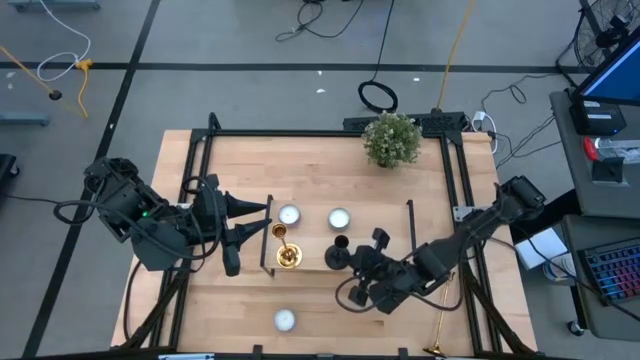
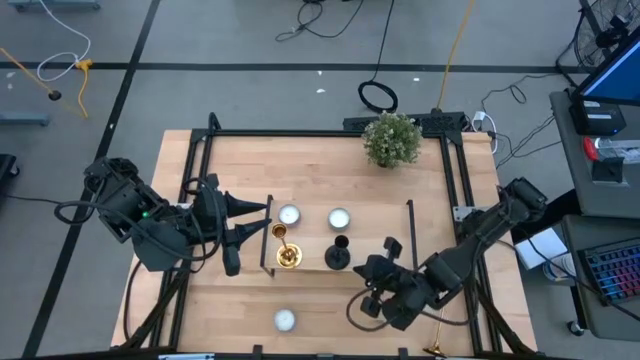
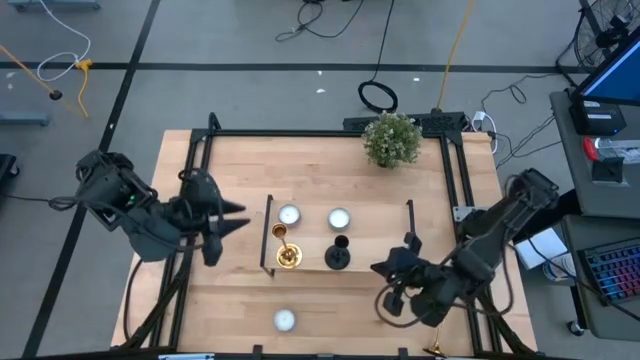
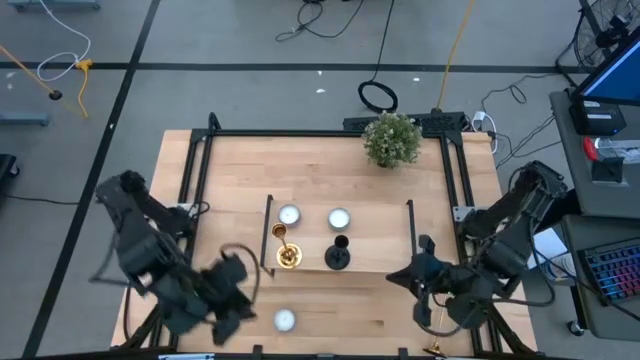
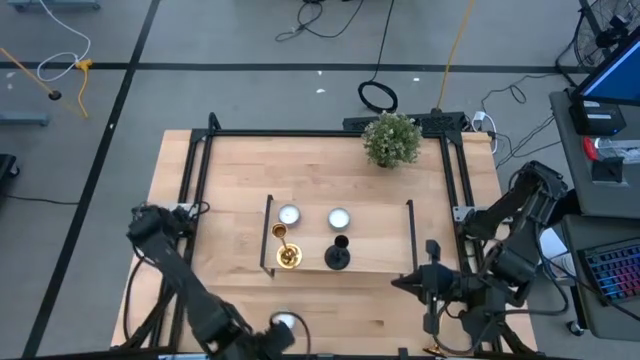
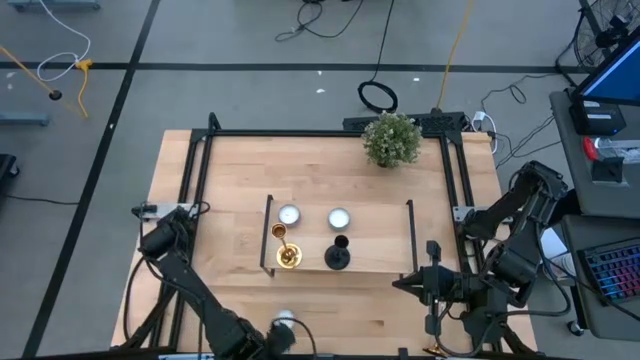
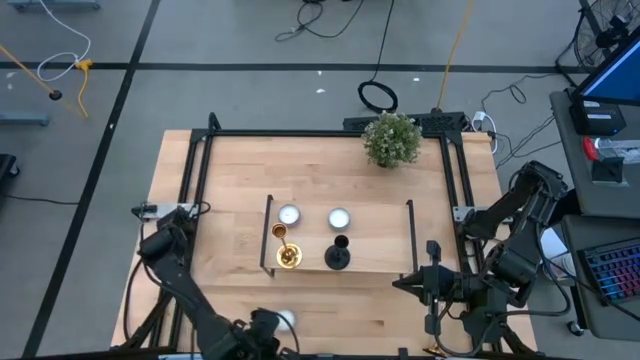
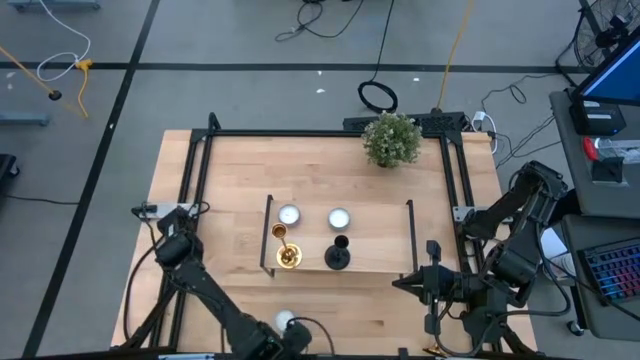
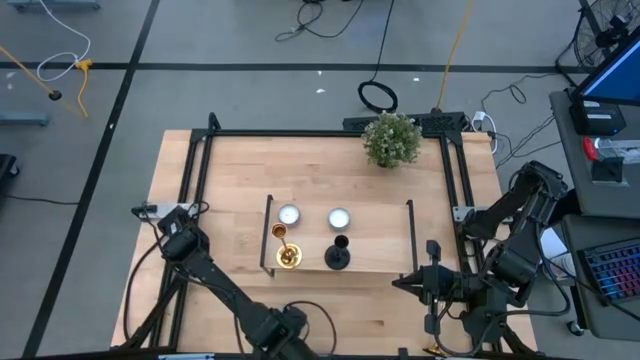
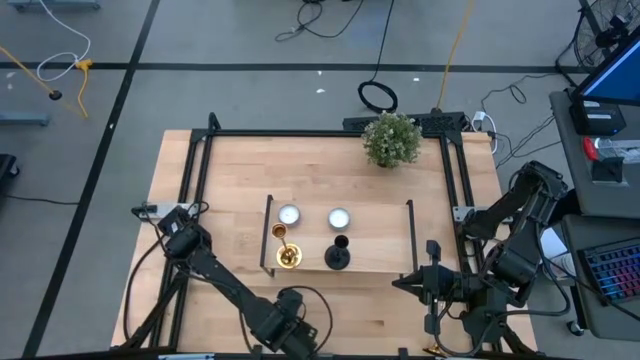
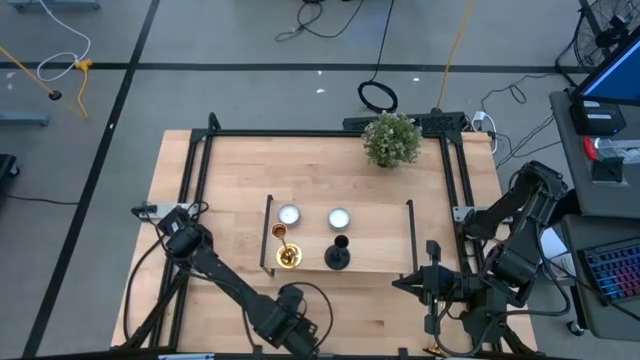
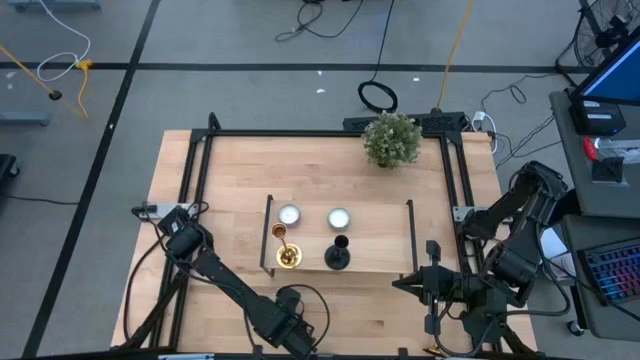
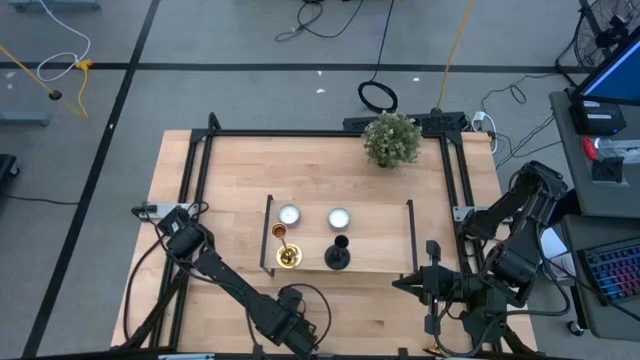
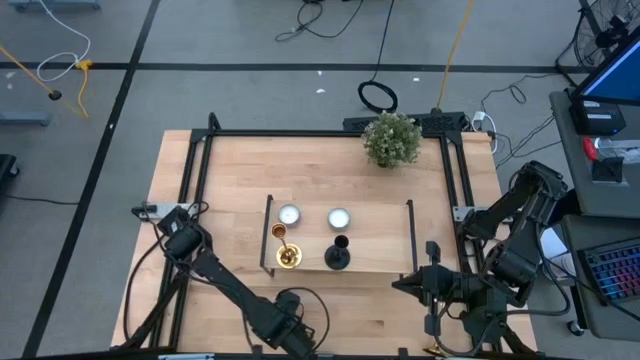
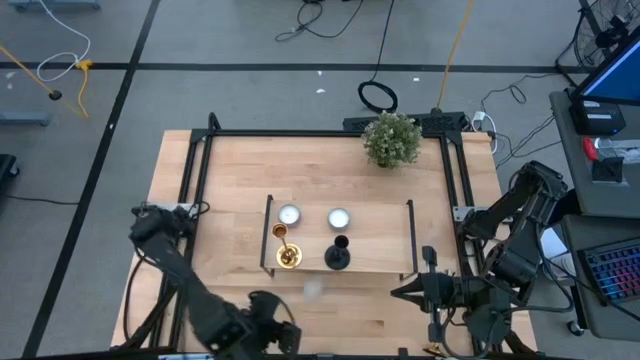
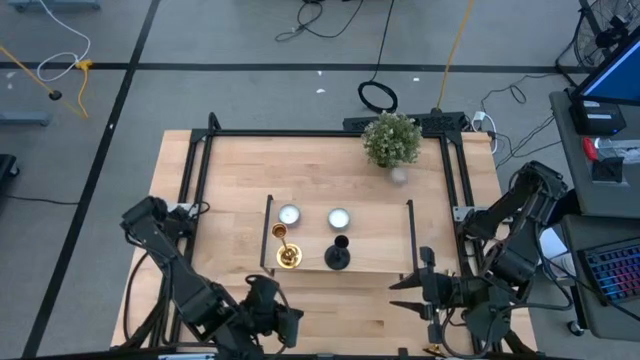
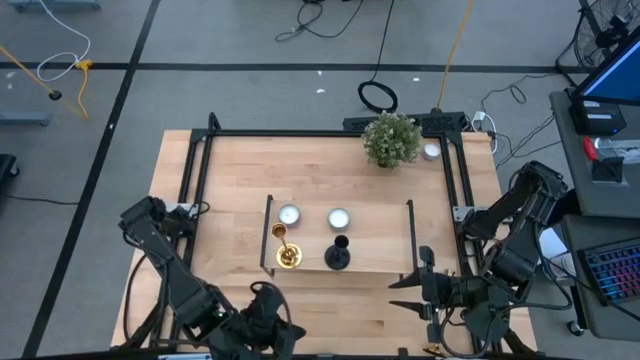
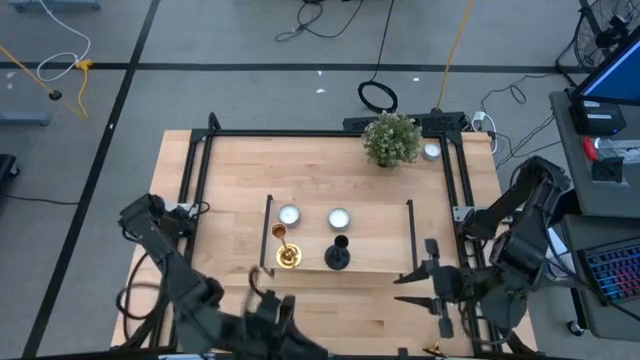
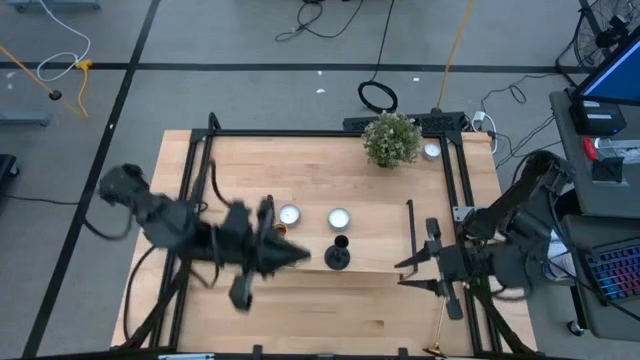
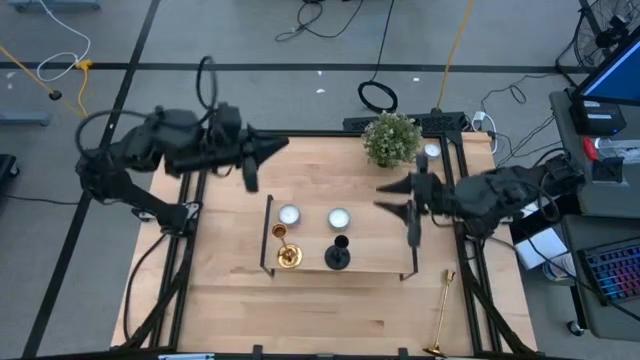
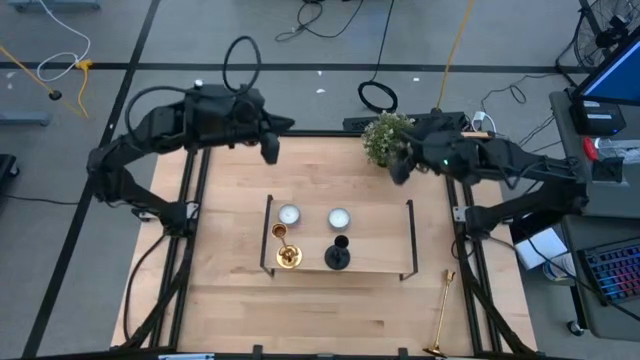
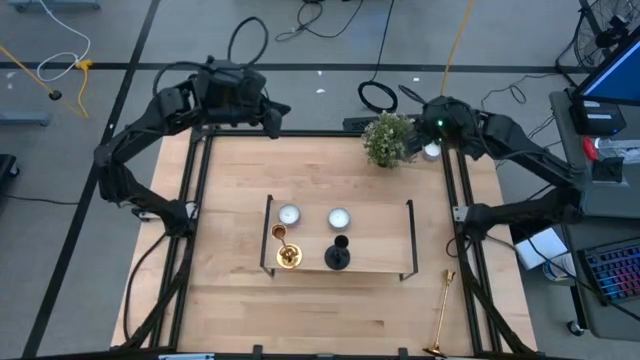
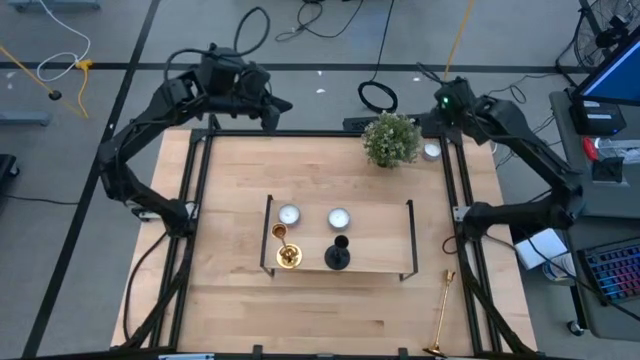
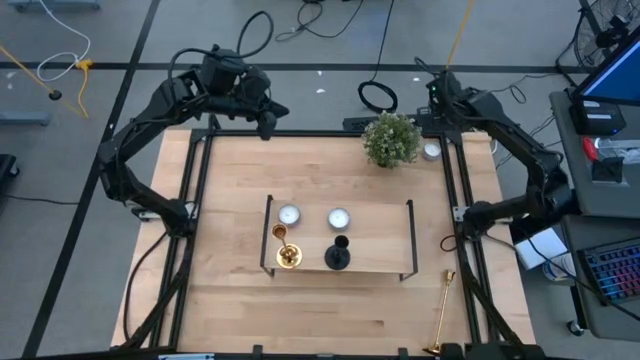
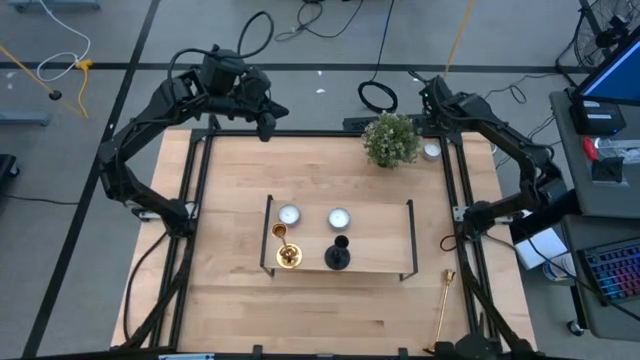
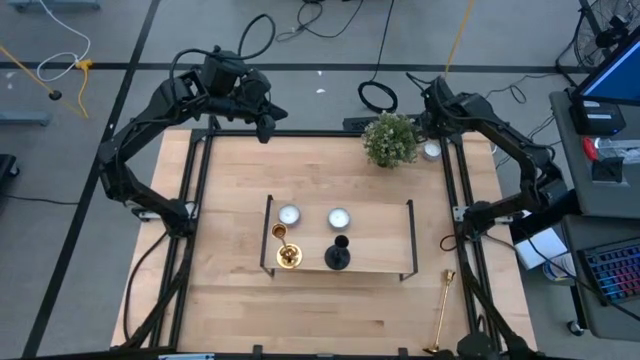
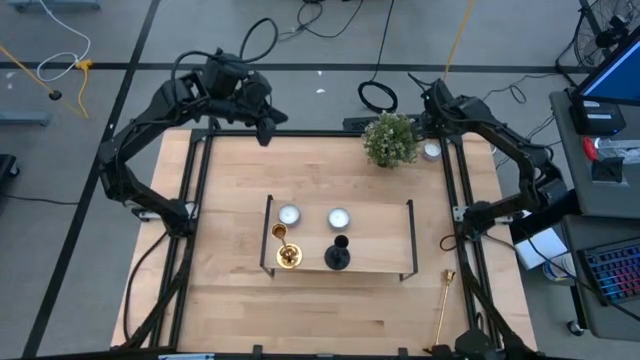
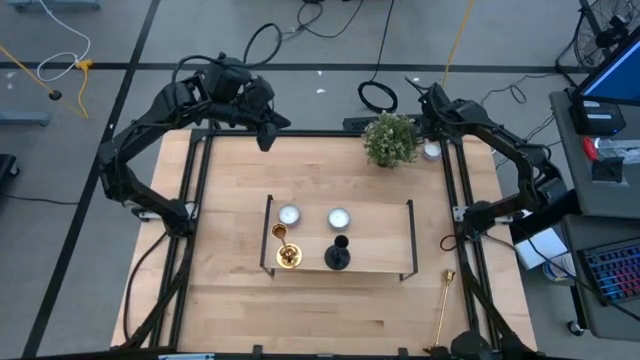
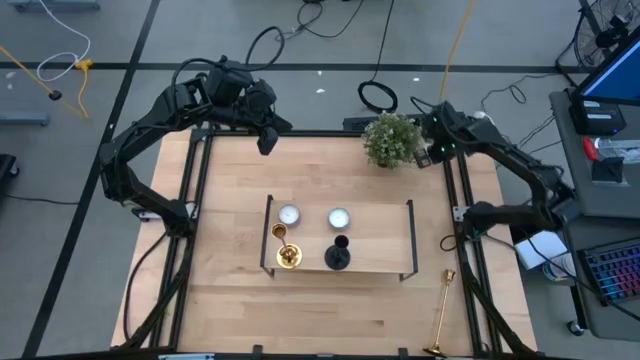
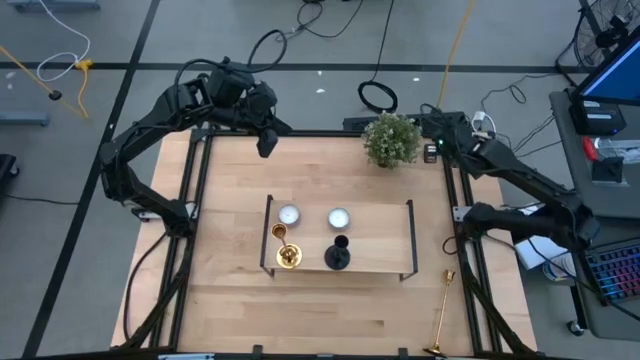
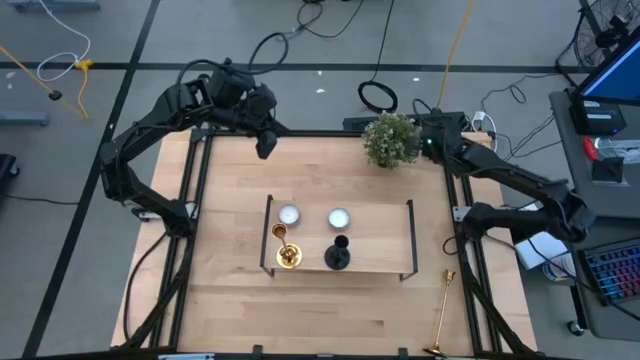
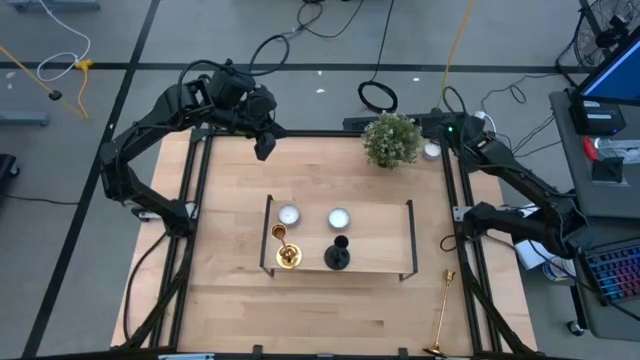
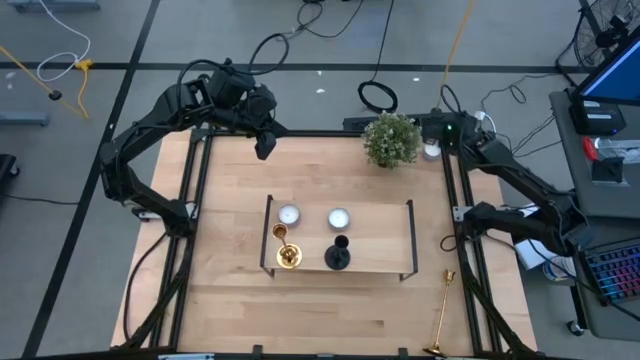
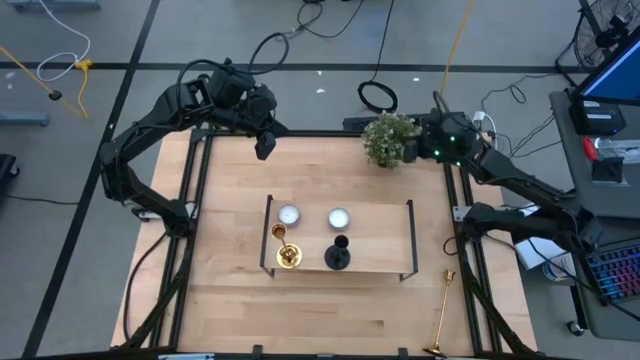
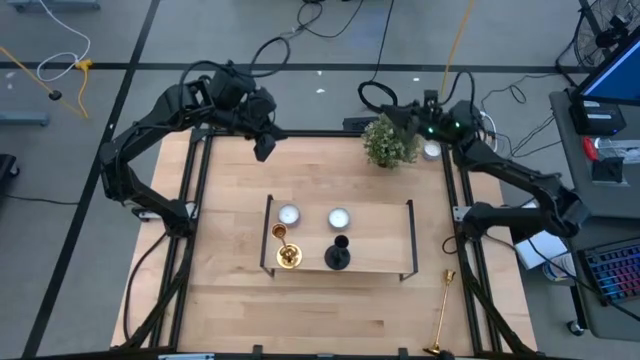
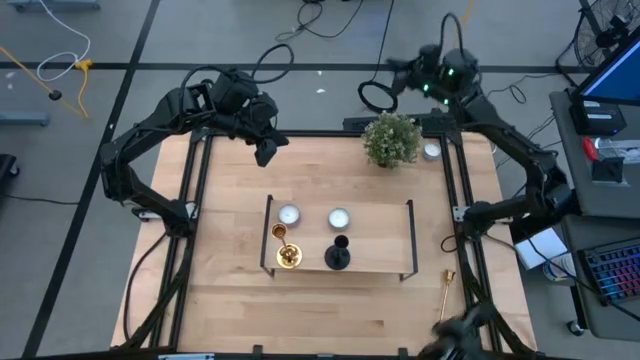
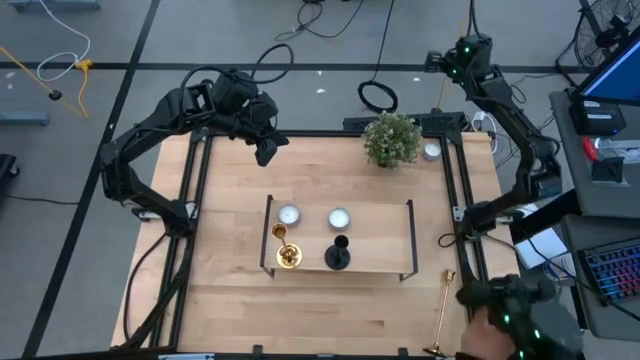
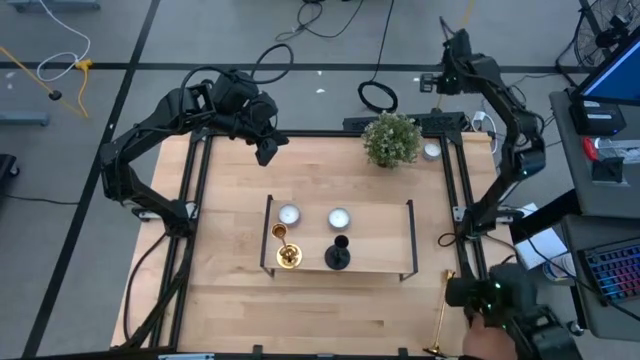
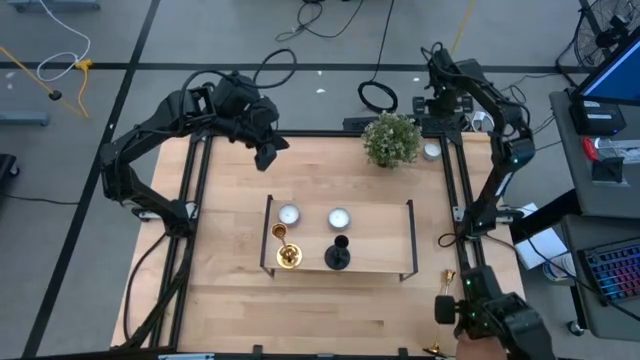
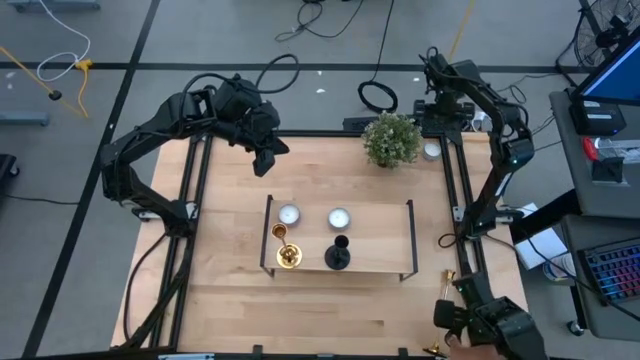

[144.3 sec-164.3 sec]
Task: Pick & Place candle stick holders
Put the white red scented candle on the shelf

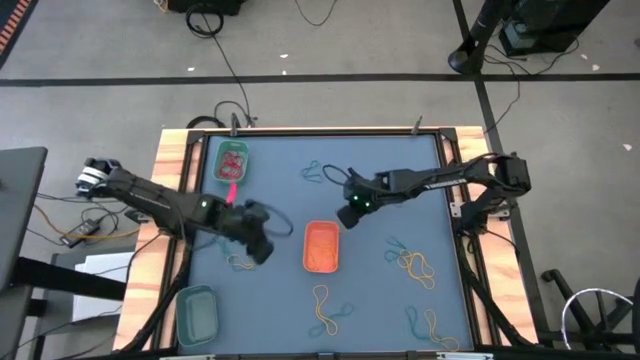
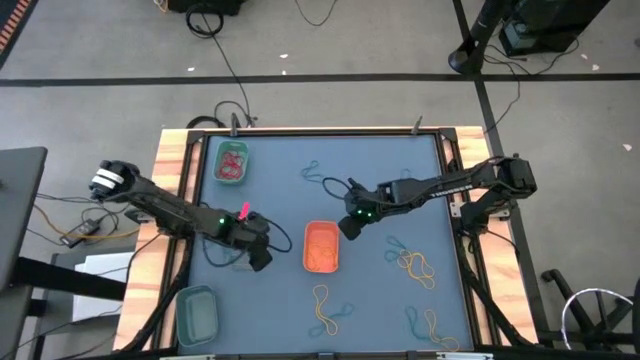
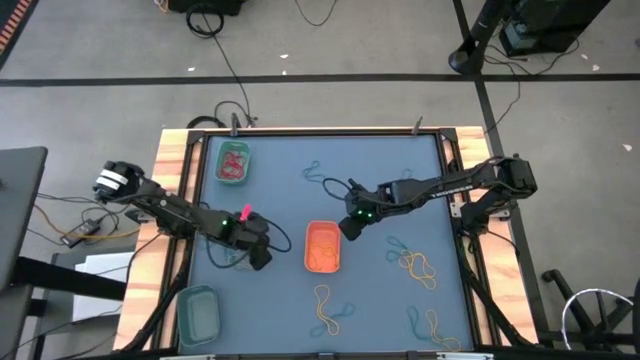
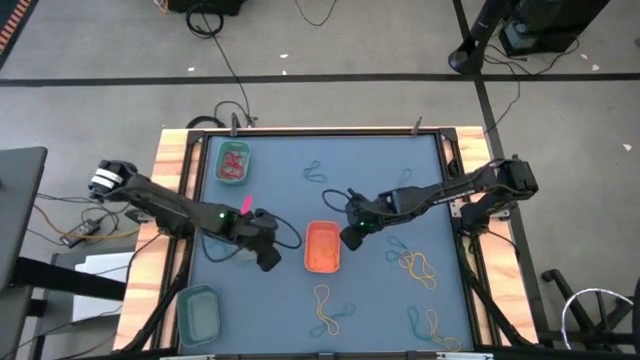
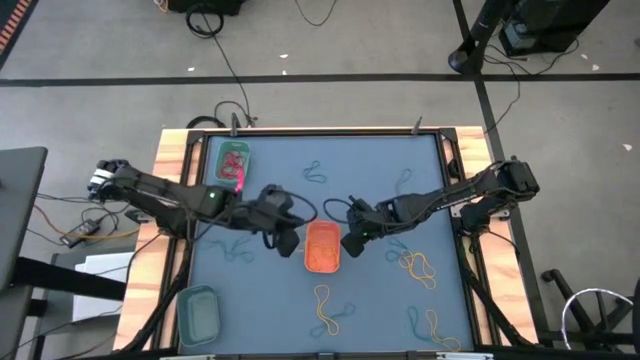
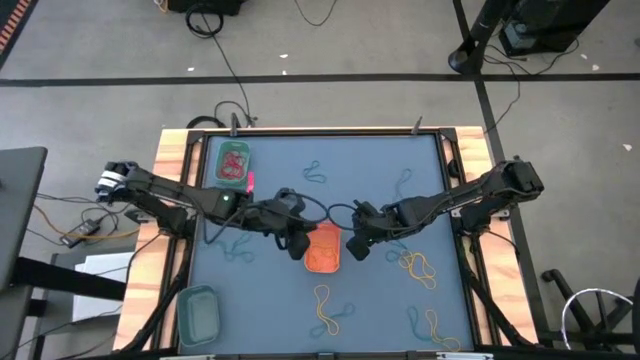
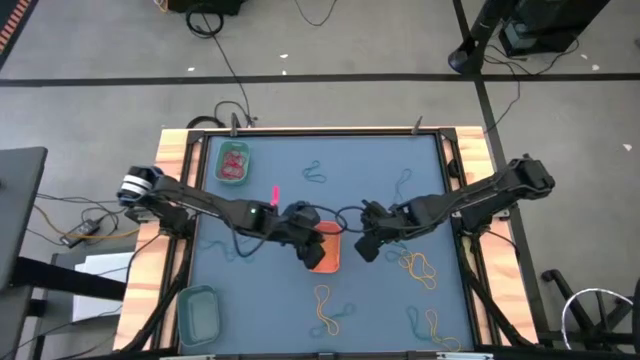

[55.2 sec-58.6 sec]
Task: Sort rubber bands into baskets
Put the yellow rubber band into the orange bin
